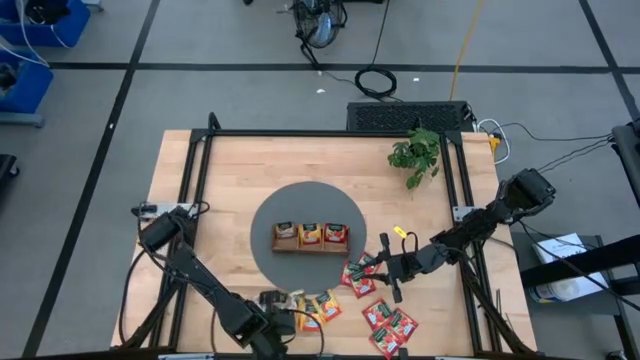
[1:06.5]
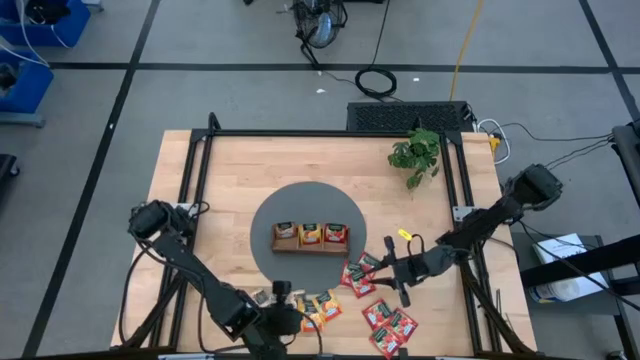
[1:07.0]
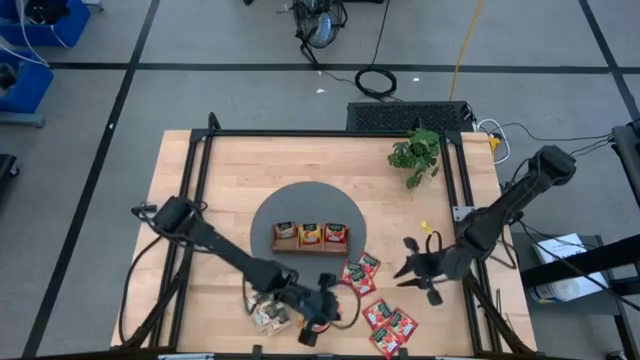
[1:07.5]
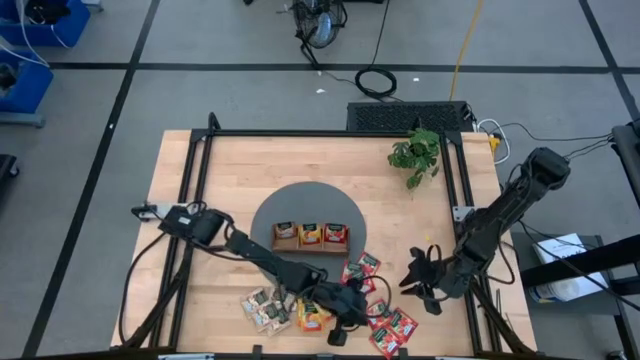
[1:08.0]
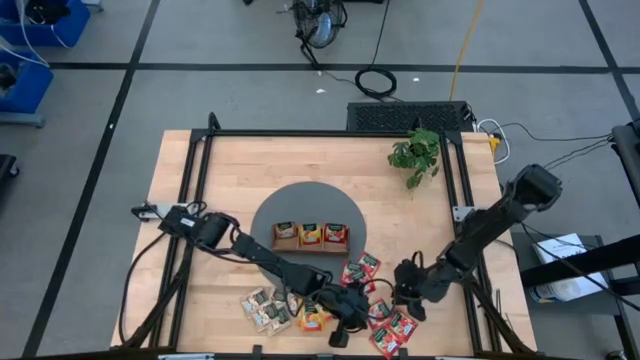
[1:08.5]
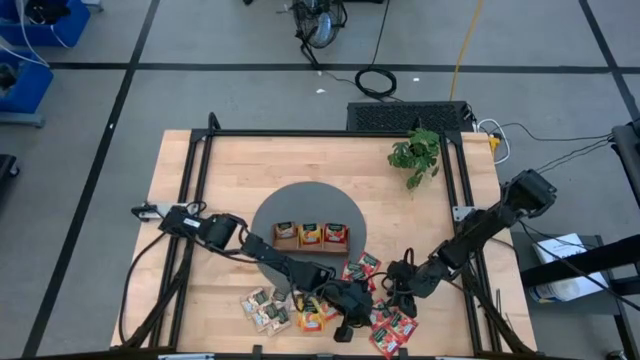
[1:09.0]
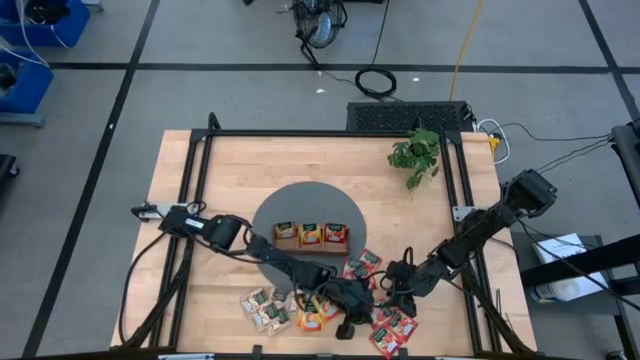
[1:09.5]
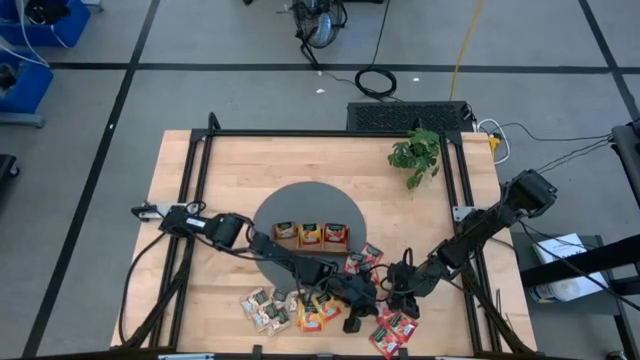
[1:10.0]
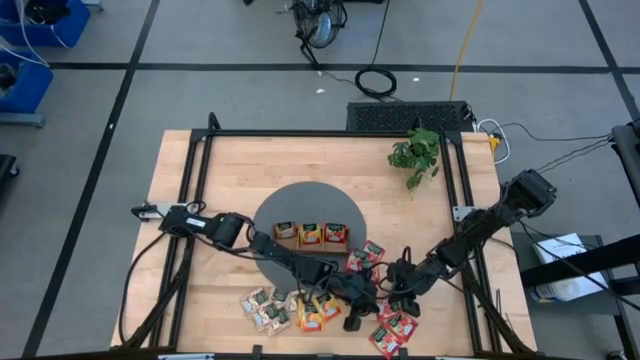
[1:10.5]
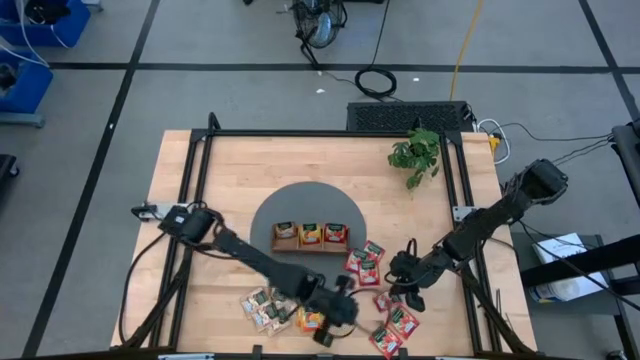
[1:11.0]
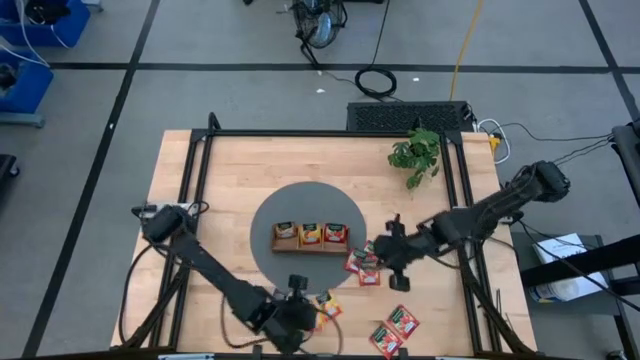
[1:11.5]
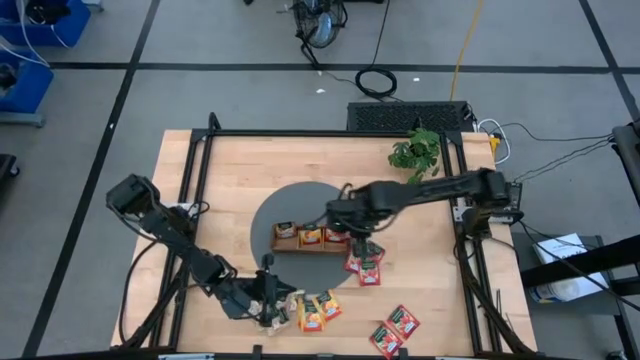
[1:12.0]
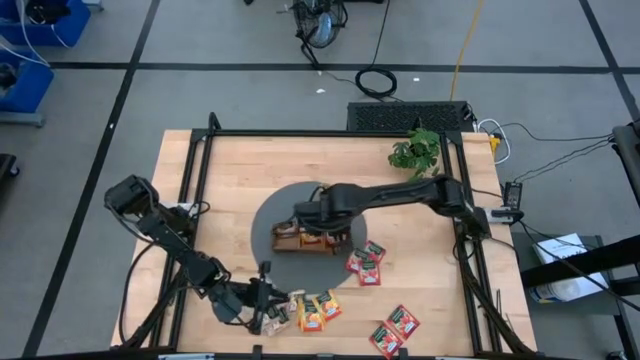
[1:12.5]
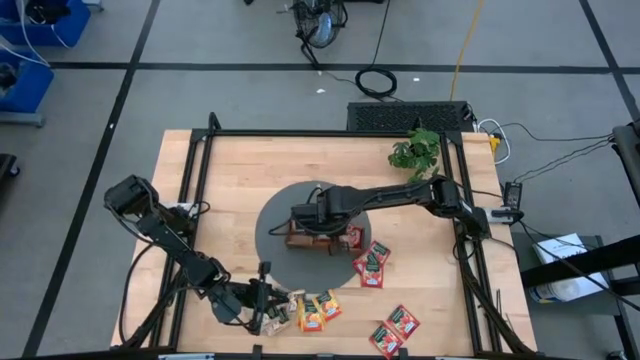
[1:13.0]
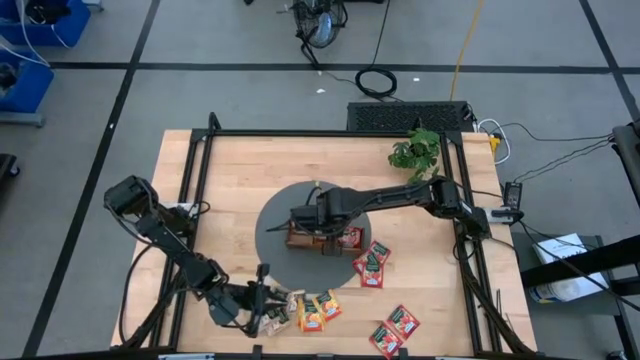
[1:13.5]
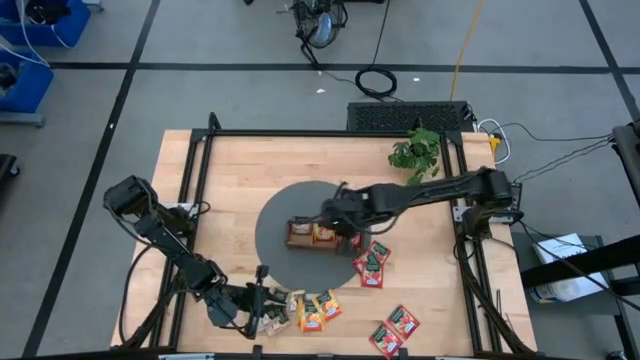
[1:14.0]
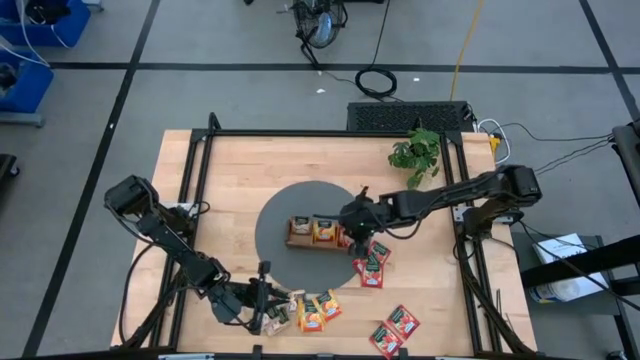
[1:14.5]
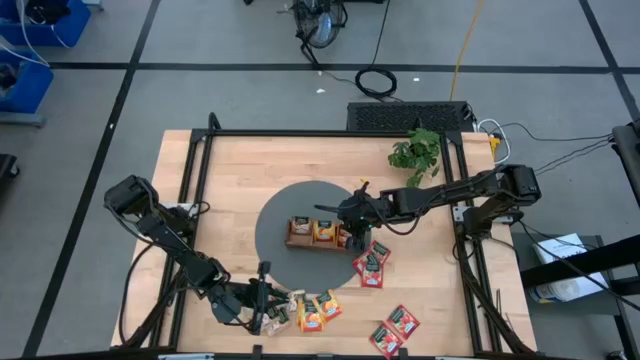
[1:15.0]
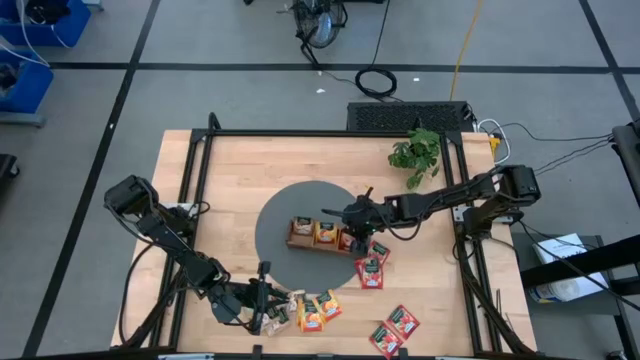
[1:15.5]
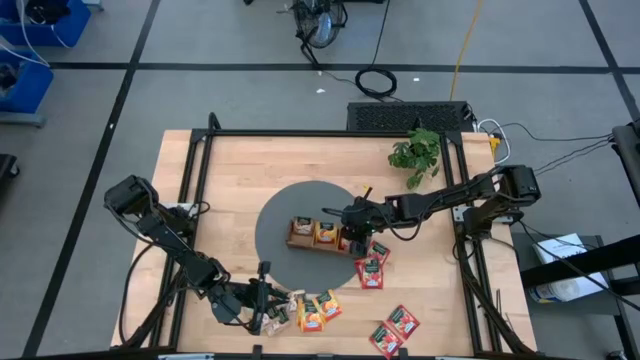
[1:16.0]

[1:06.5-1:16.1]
Task: Pick & Place Tea
Put the red tea sachet into the right section of the wooden organizer

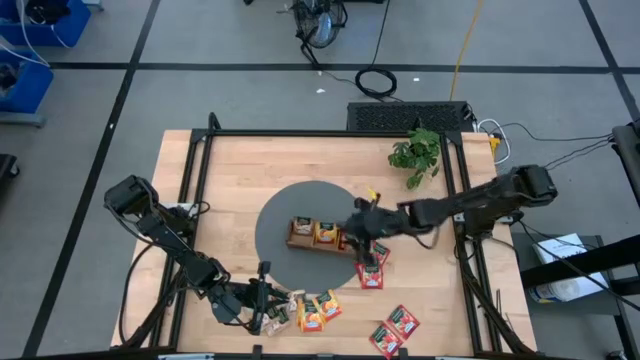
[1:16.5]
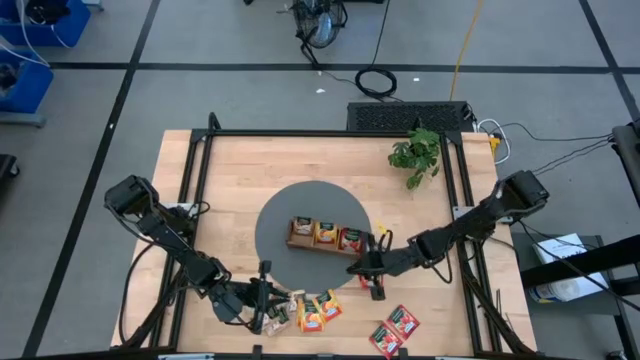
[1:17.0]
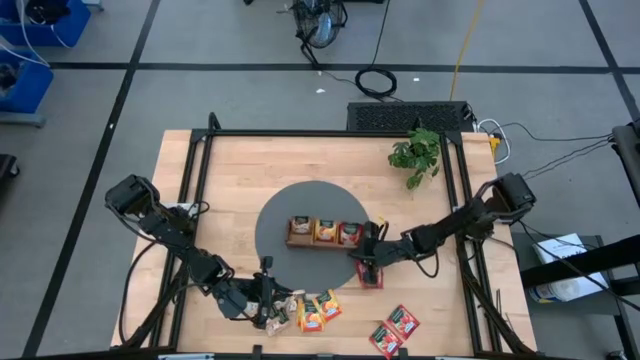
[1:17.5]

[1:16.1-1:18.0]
Adjust the wooden organizer

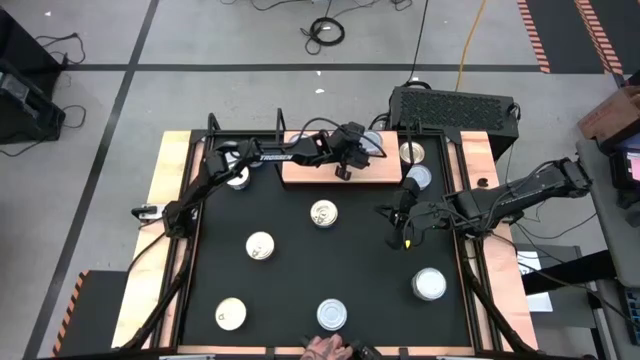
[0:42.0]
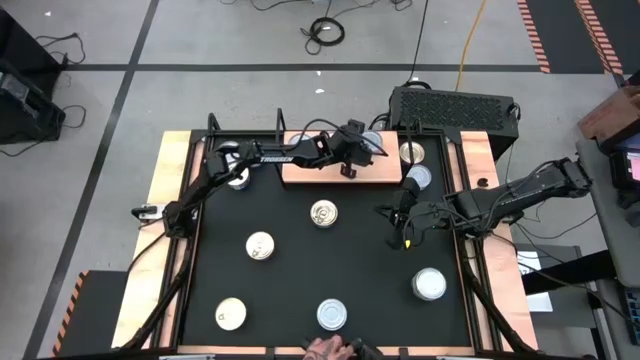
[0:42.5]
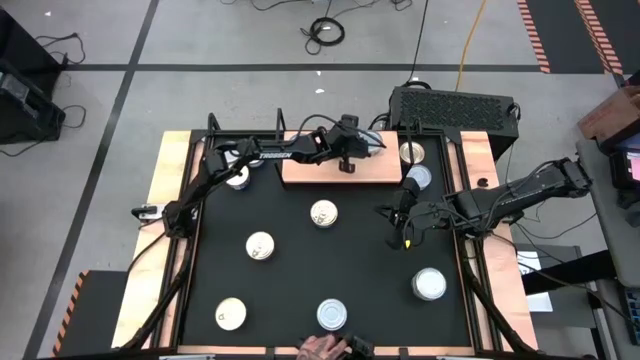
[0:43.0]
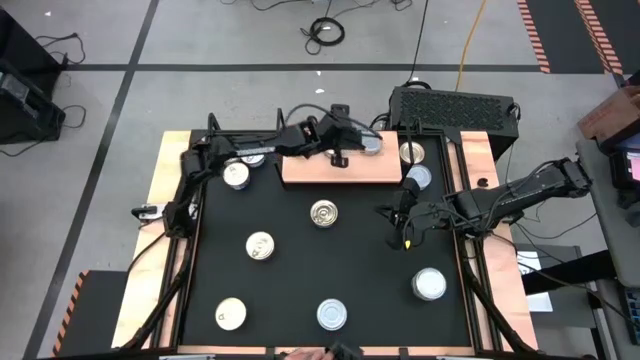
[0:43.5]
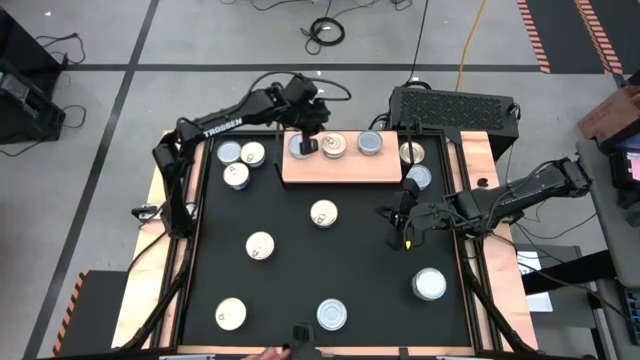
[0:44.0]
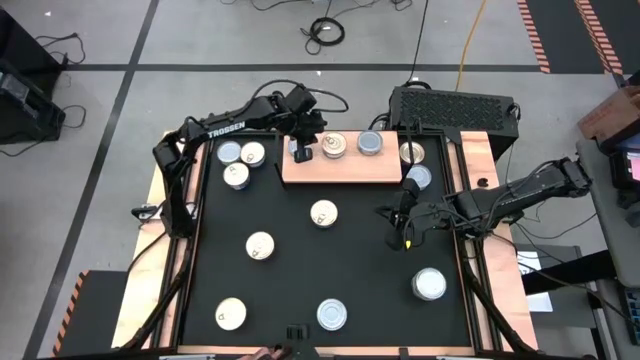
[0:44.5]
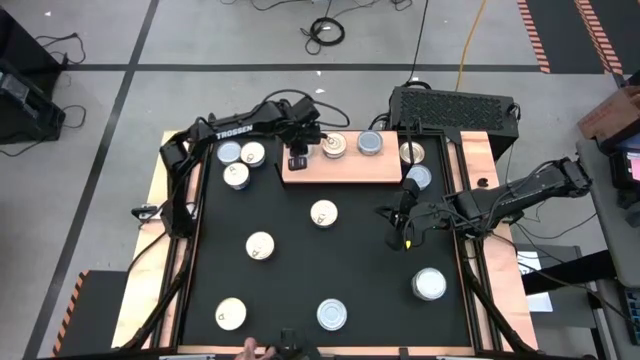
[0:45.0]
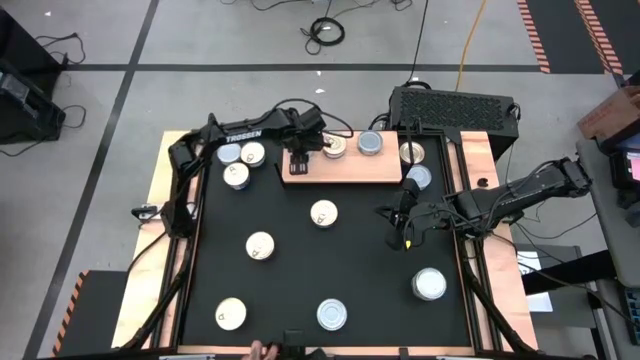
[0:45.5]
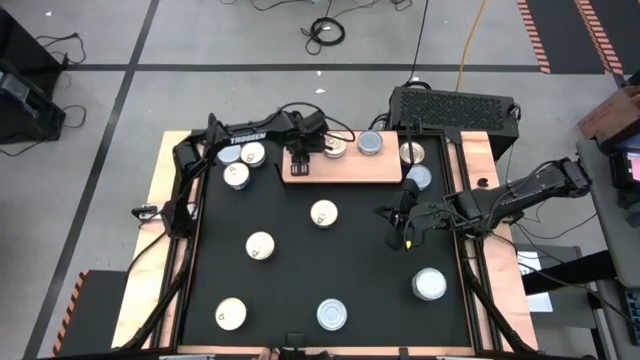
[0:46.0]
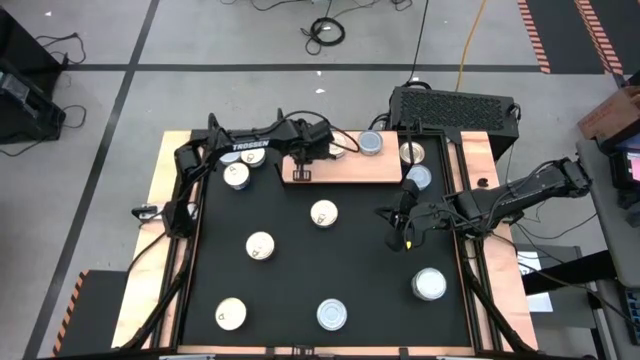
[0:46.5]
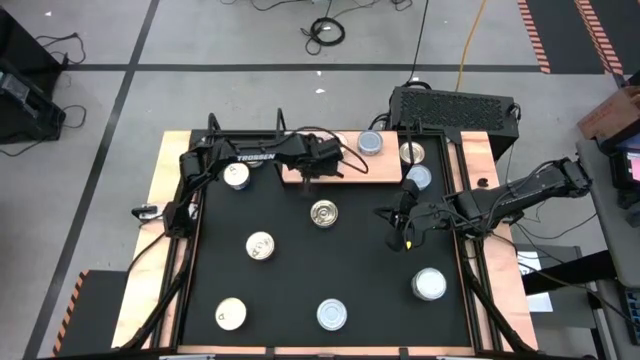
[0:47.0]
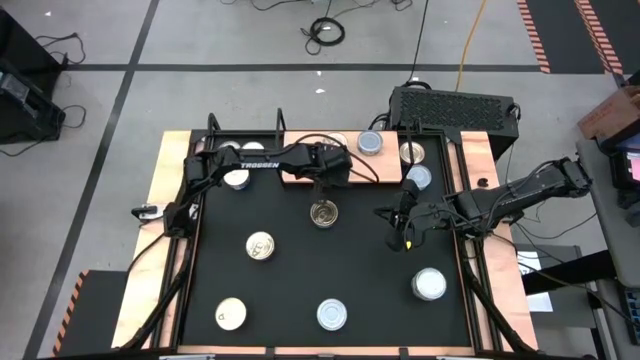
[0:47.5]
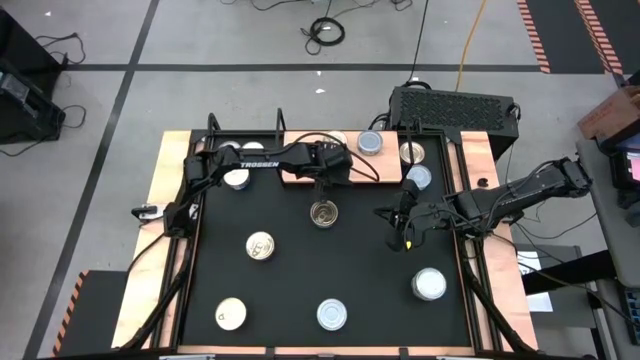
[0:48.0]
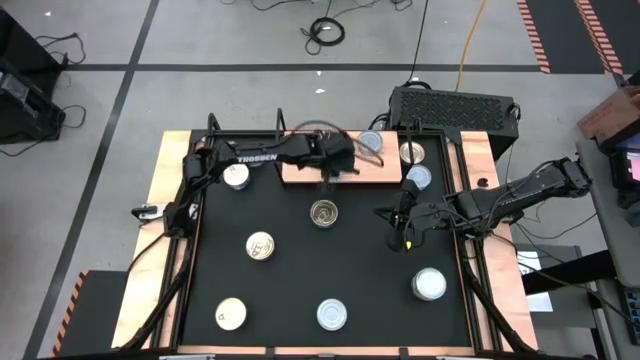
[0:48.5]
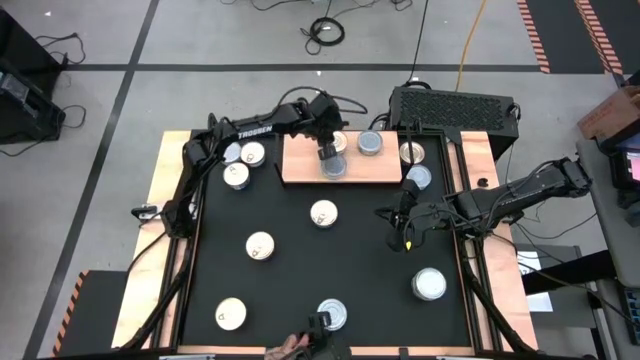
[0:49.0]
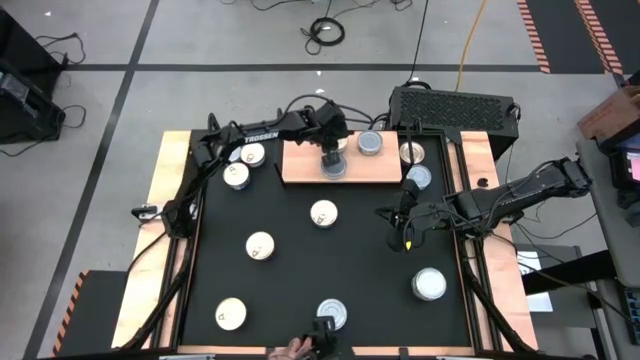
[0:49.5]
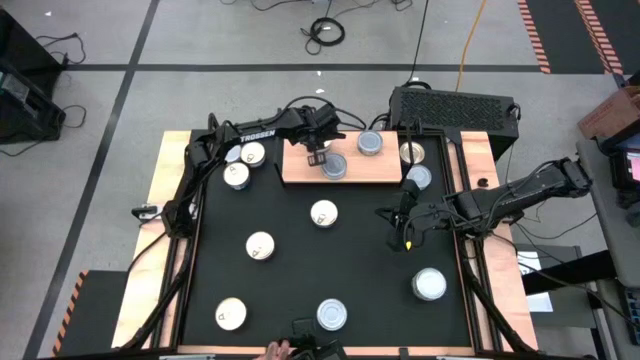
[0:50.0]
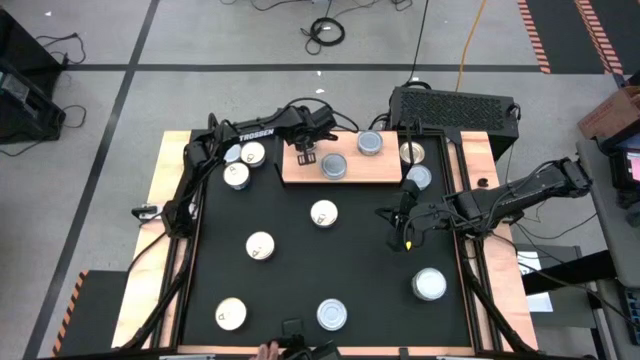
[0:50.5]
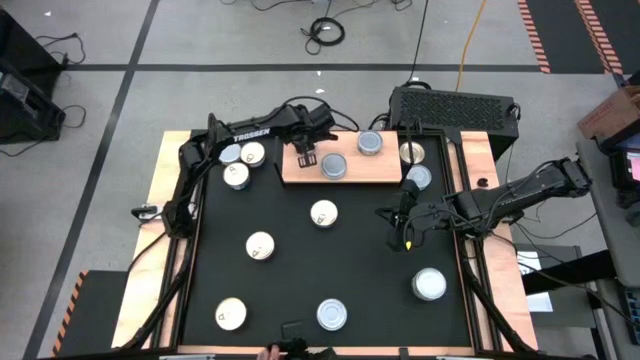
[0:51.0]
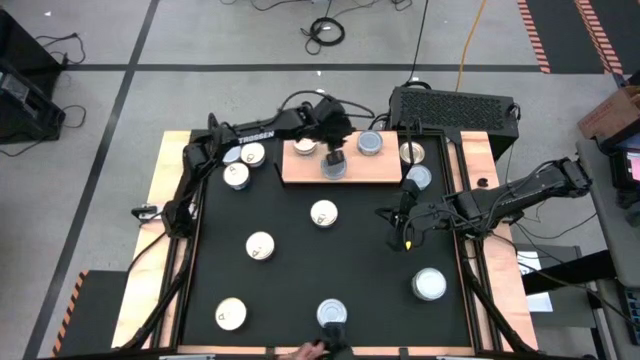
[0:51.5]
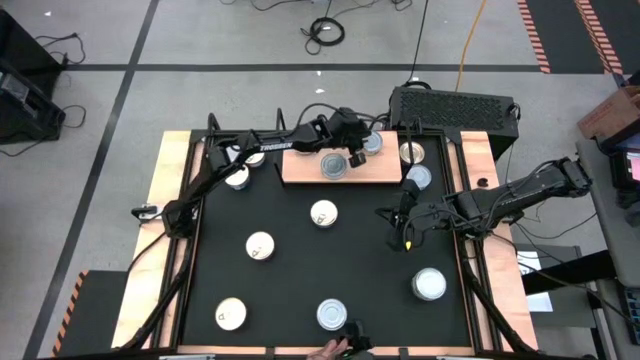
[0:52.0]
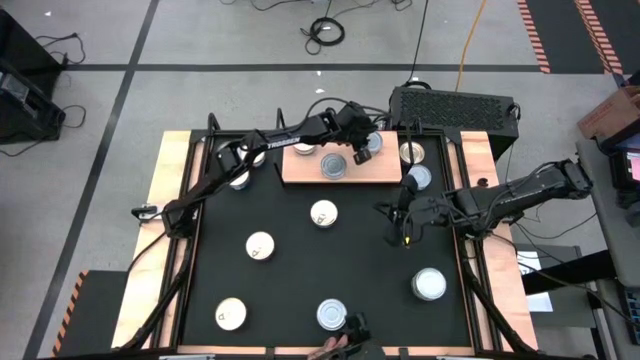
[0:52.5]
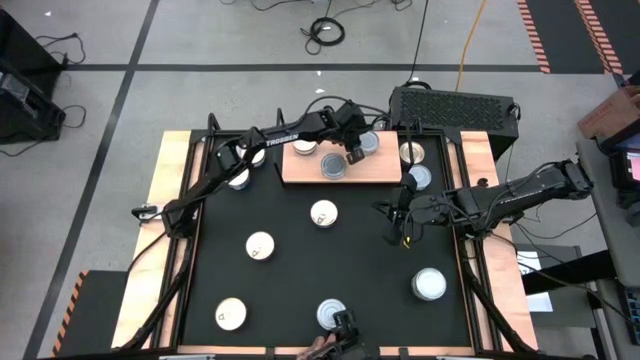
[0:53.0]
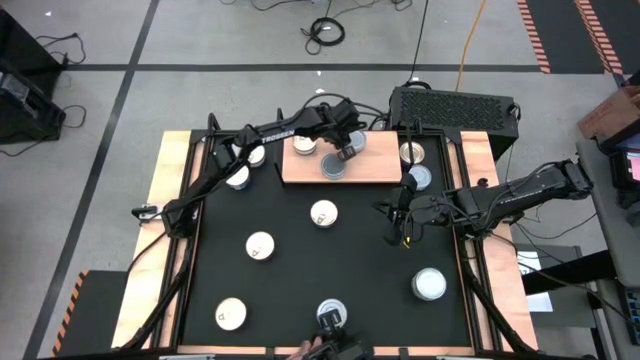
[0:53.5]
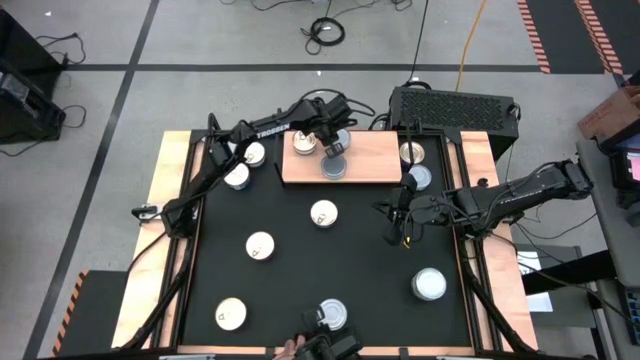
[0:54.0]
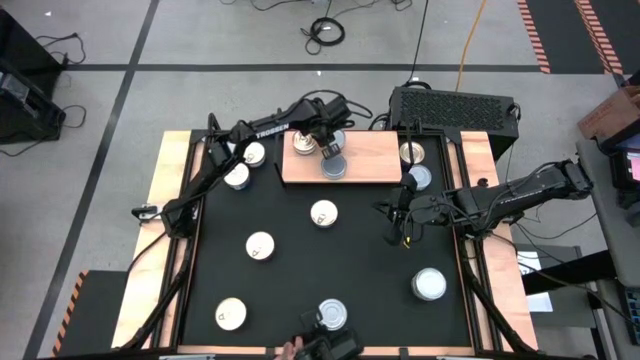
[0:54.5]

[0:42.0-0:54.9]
Task: Stack canned seafood by type on shelf
Adjust the tuna cans and align them by color on the shelf
